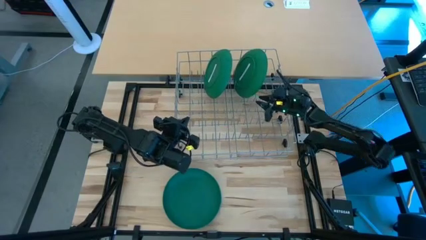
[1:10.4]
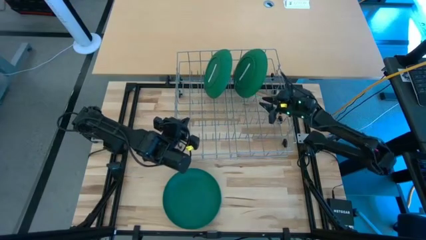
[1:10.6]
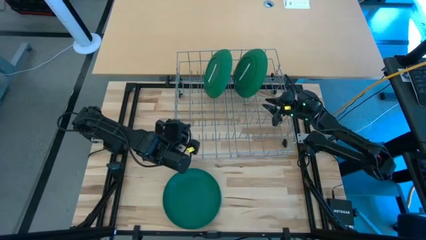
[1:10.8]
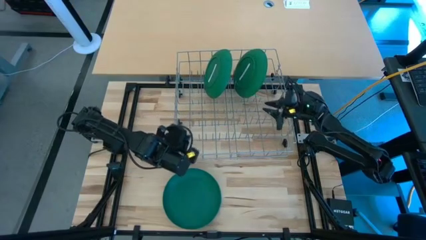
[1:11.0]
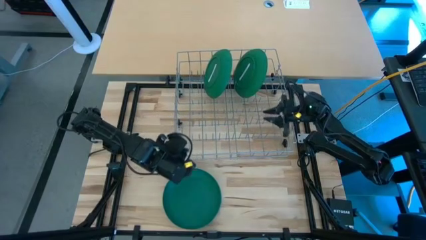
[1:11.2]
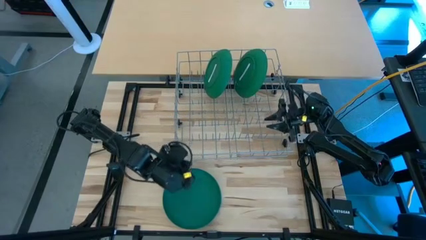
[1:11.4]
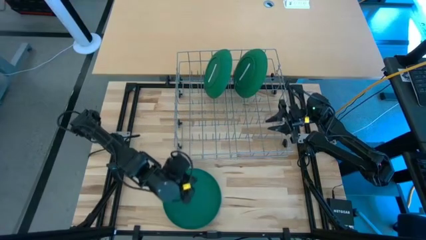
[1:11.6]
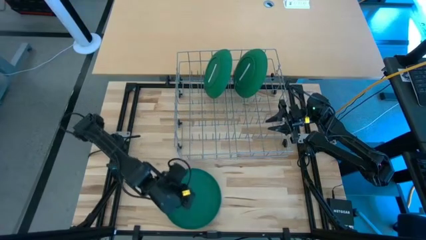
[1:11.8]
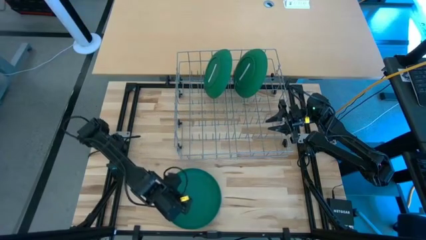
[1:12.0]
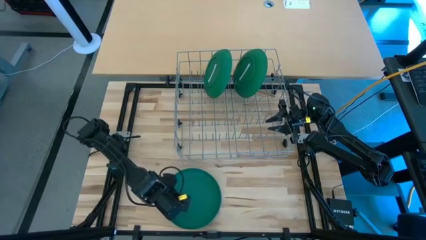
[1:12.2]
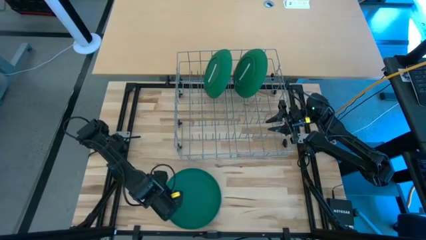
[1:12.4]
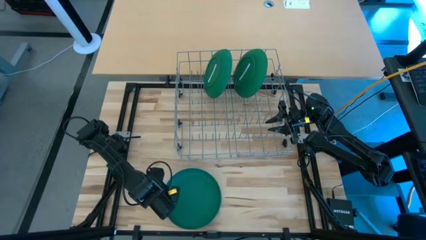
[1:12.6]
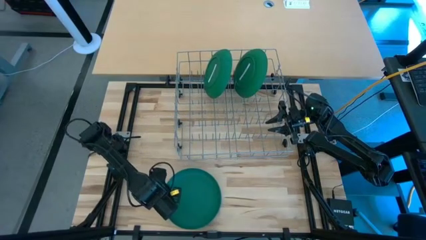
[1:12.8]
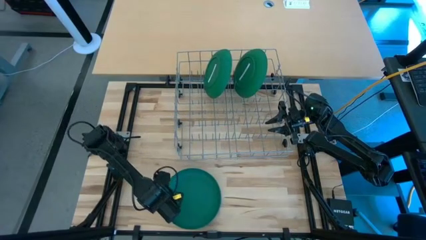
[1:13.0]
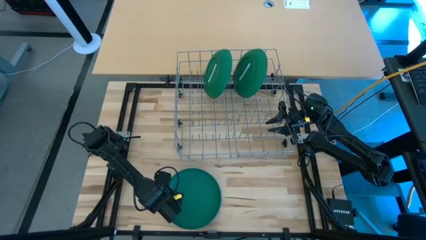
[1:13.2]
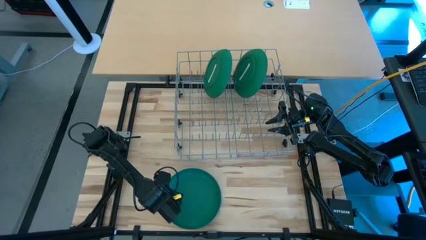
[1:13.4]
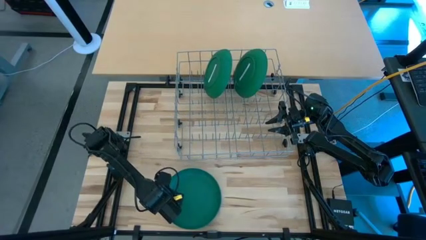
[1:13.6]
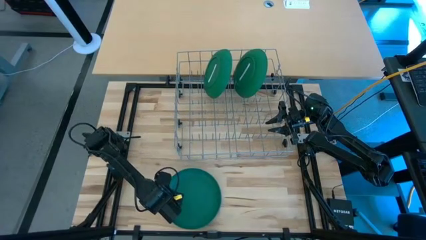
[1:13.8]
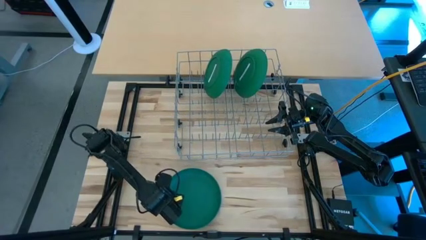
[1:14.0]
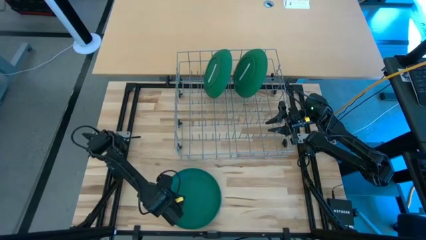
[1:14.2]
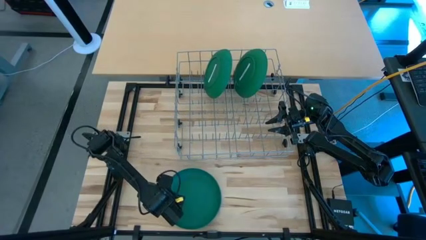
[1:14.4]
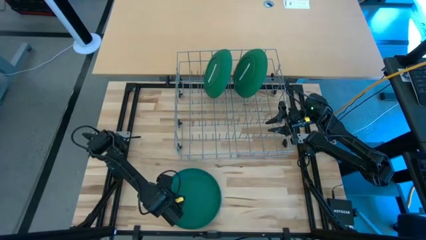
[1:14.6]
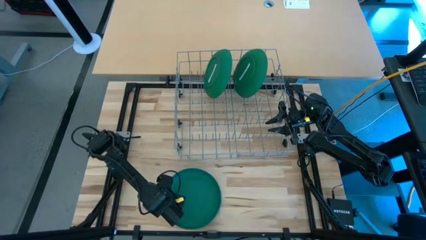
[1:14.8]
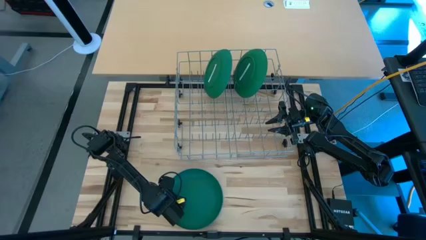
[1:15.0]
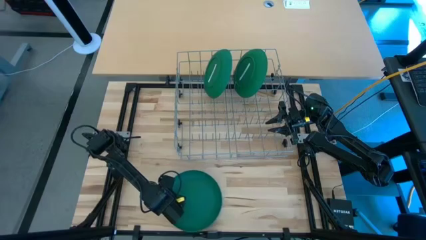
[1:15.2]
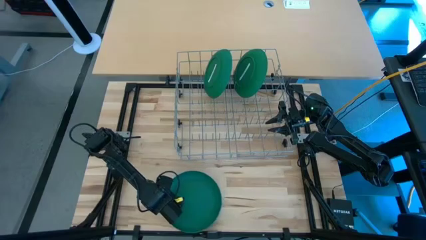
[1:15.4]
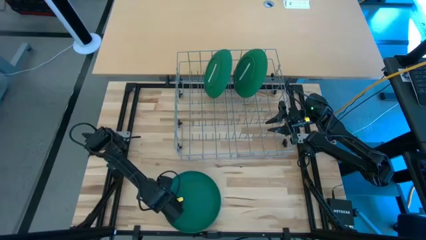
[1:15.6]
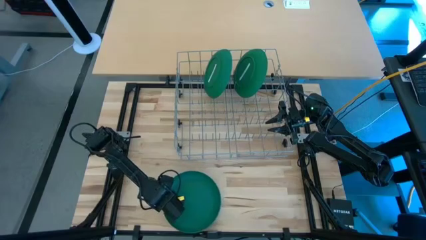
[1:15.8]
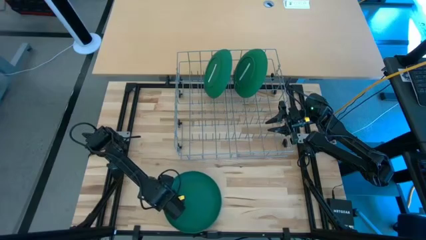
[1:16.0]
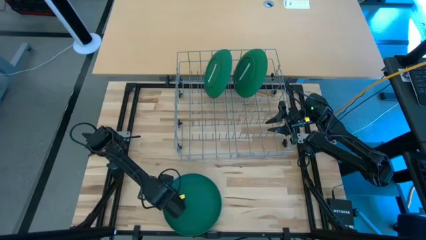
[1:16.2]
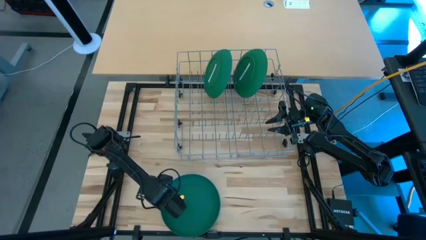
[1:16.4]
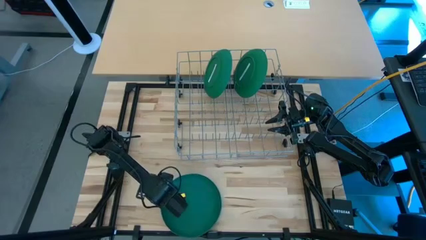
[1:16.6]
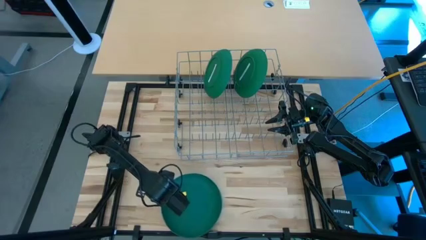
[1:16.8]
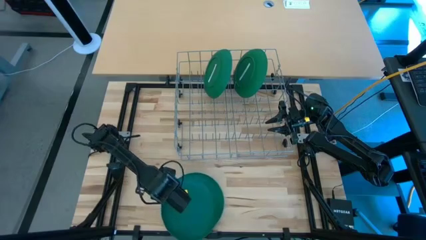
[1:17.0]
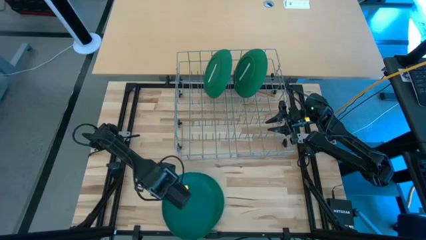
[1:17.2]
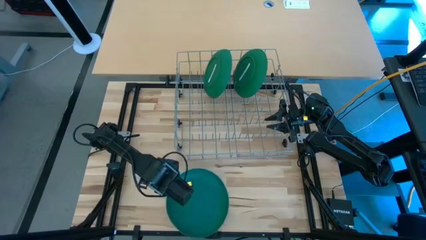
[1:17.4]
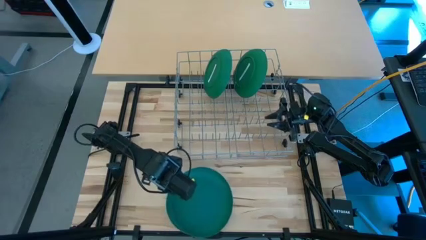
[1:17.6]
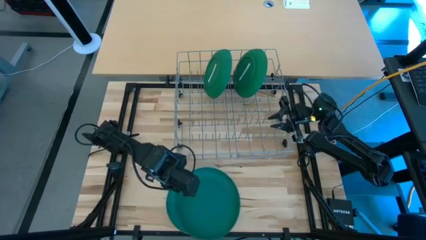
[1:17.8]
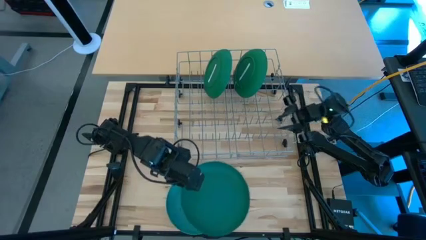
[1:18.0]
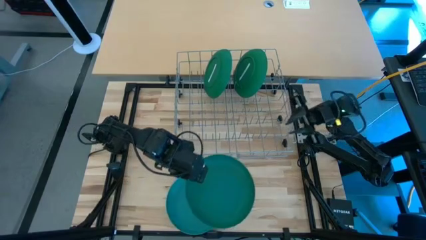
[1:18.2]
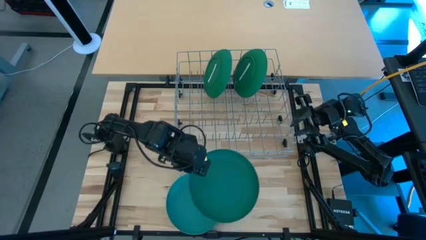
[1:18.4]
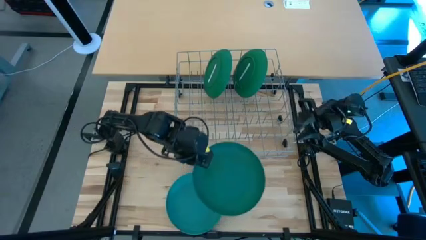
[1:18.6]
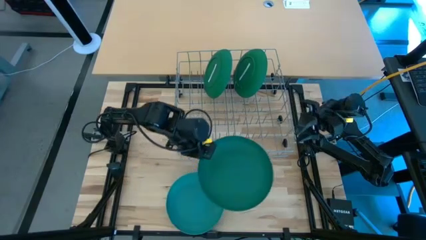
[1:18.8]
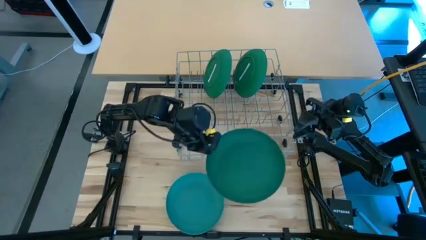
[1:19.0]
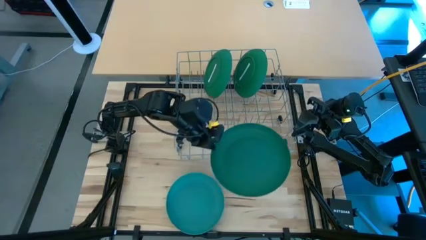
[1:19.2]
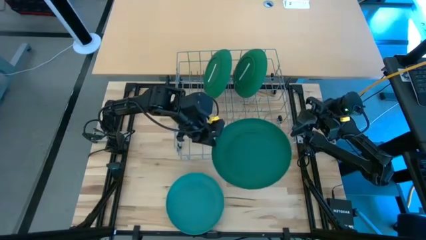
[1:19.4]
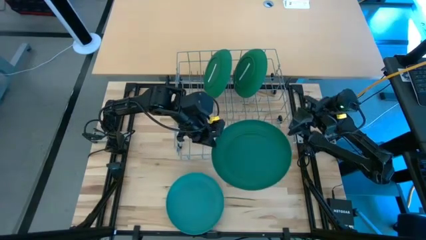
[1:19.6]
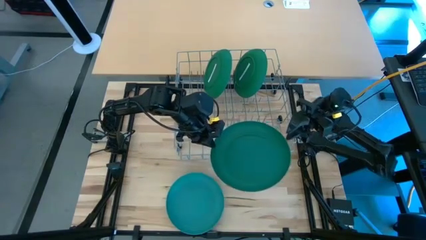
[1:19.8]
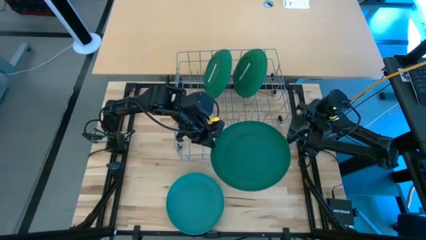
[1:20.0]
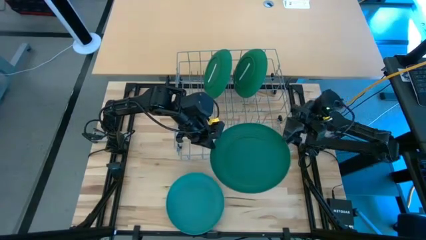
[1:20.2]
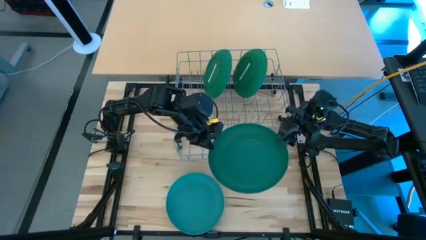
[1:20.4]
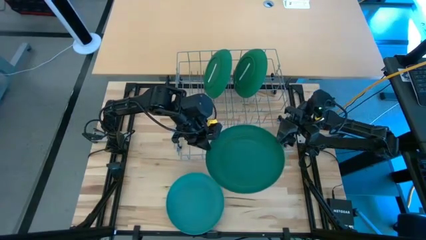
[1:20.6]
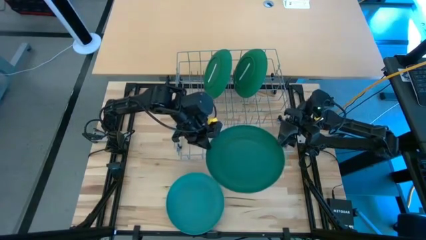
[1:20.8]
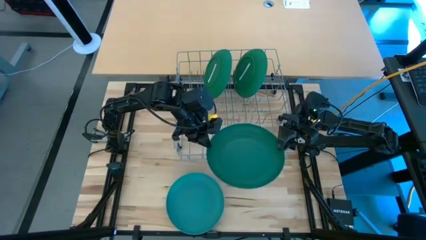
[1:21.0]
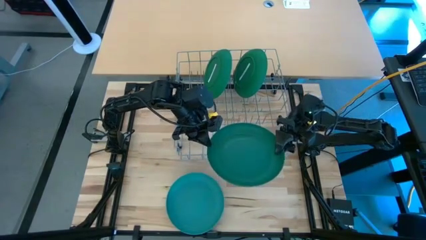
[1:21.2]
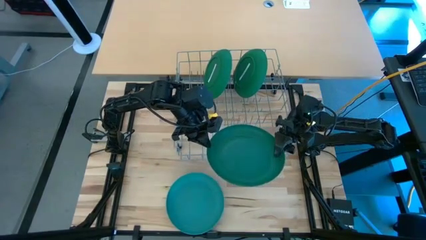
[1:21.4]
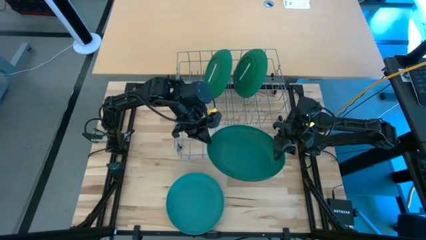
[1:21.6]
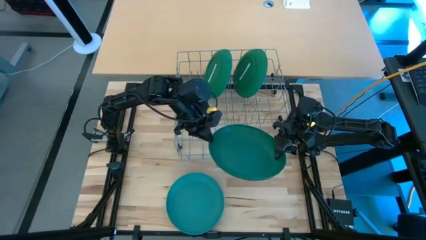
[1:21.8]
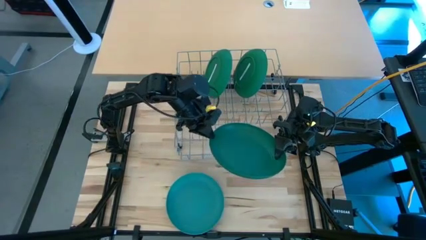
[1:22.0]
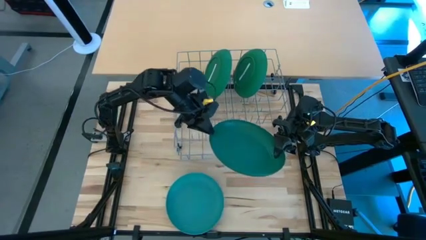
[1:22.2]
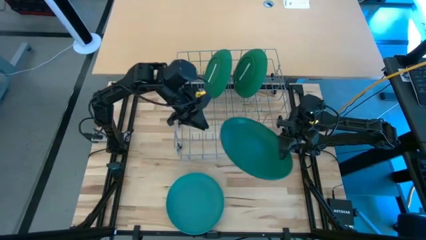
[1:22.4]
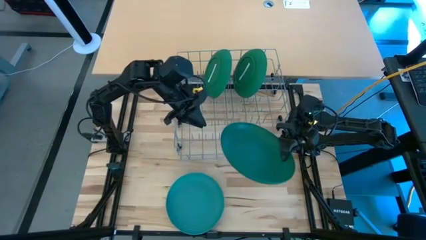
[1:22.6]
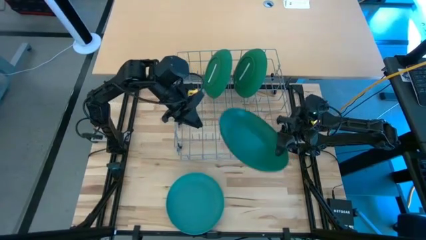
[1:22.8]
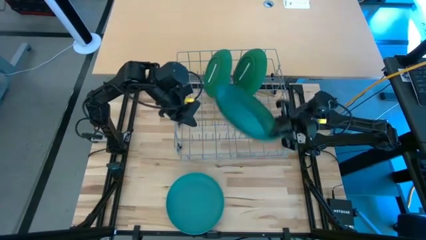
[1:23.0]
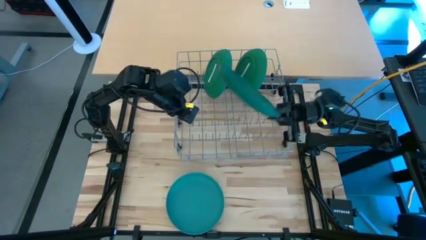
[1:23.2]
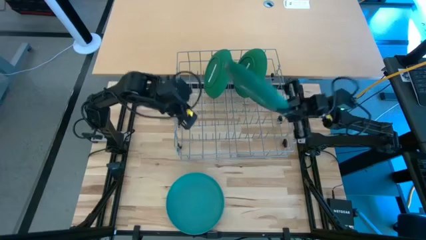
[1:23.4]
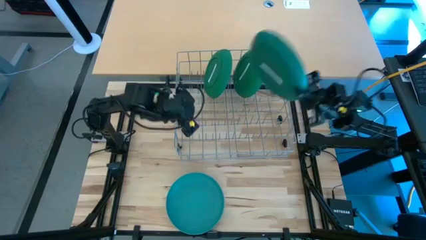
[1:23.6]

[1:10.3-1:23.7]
Task: Sort dishes
Put the green plate in the dish rack
